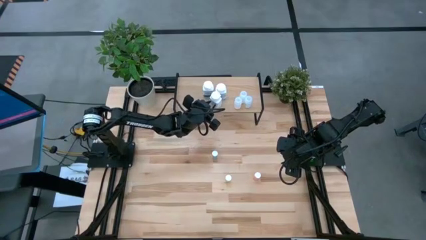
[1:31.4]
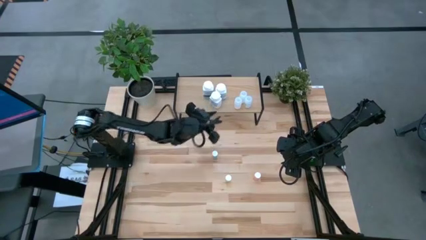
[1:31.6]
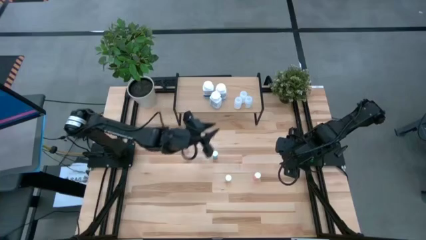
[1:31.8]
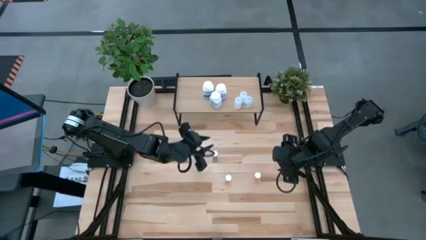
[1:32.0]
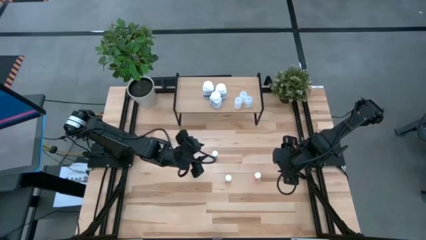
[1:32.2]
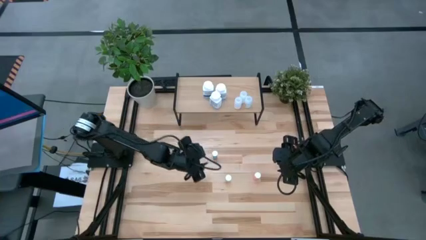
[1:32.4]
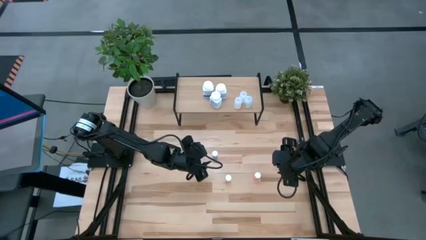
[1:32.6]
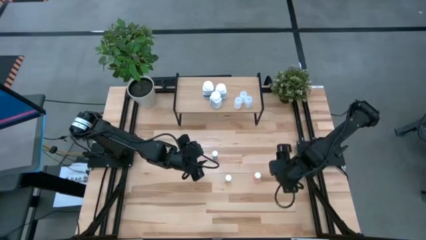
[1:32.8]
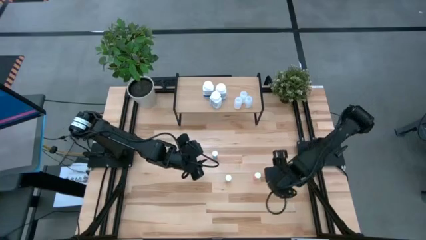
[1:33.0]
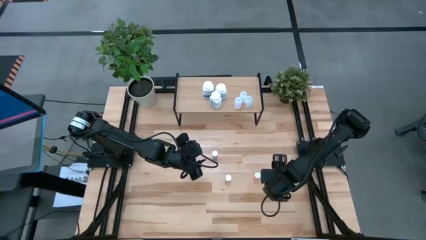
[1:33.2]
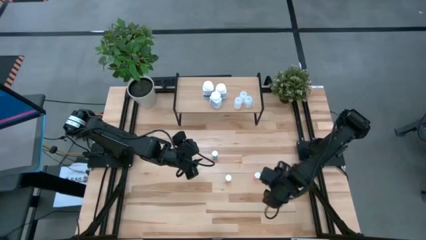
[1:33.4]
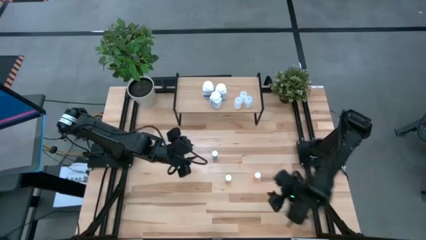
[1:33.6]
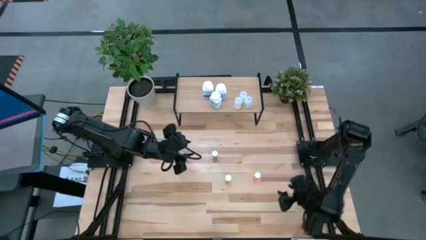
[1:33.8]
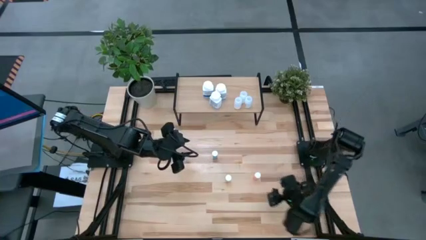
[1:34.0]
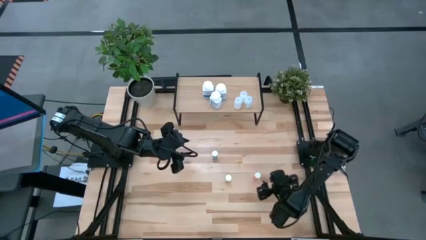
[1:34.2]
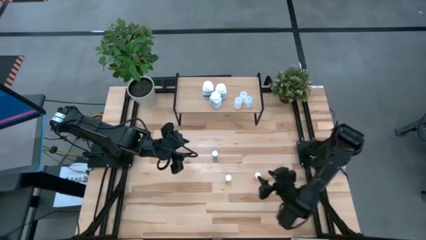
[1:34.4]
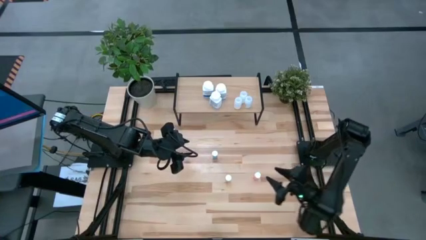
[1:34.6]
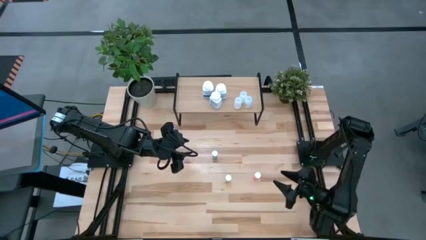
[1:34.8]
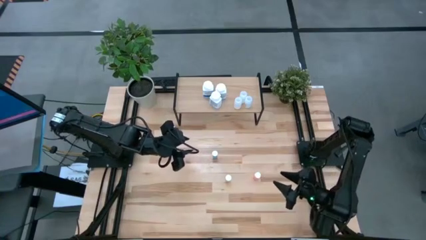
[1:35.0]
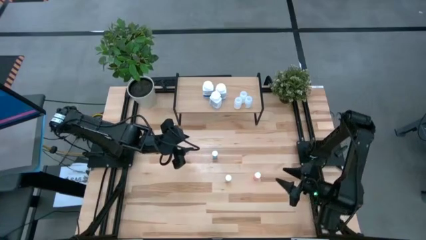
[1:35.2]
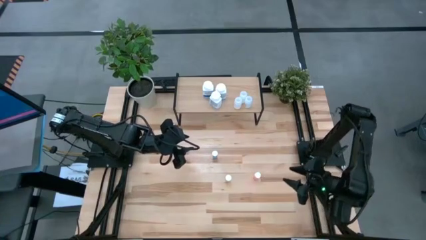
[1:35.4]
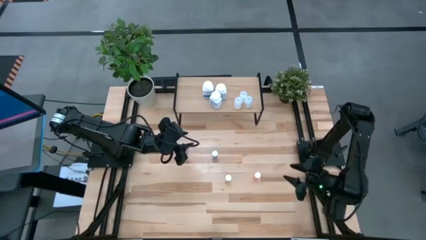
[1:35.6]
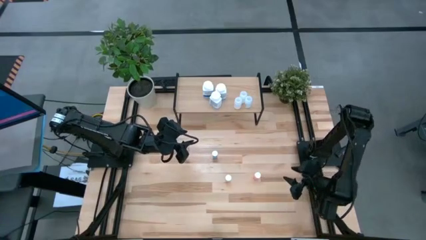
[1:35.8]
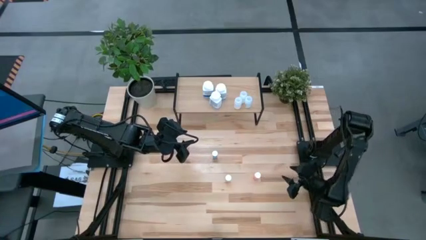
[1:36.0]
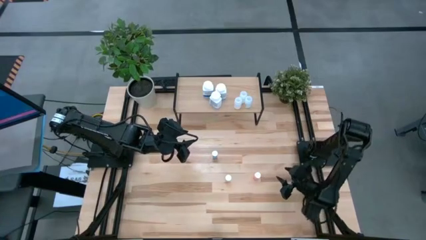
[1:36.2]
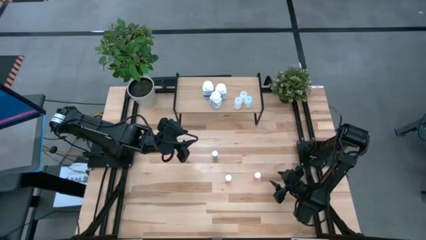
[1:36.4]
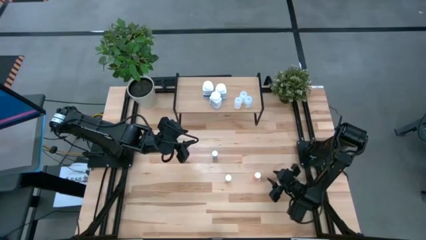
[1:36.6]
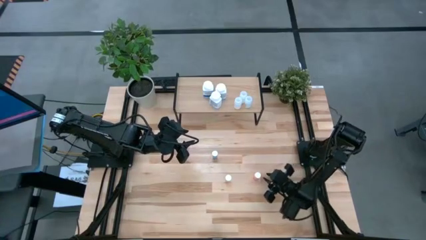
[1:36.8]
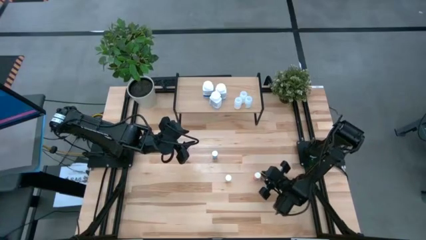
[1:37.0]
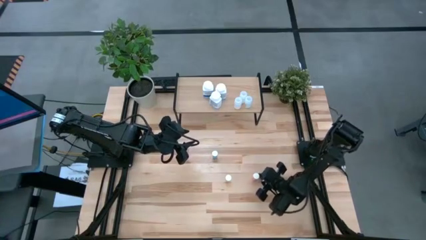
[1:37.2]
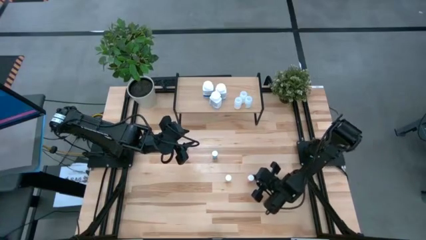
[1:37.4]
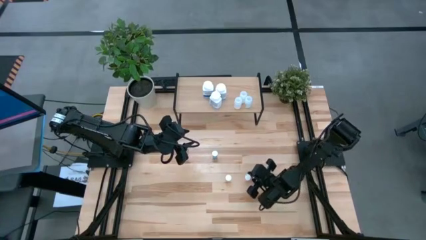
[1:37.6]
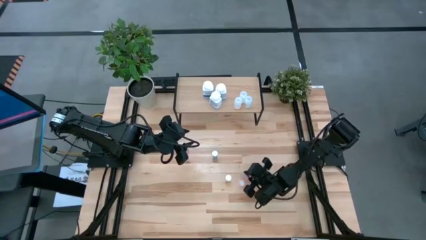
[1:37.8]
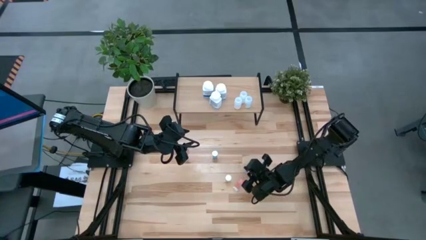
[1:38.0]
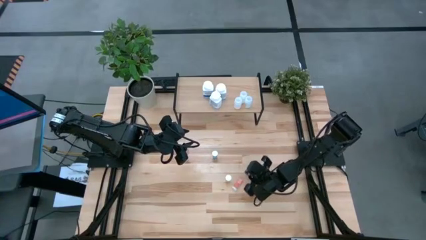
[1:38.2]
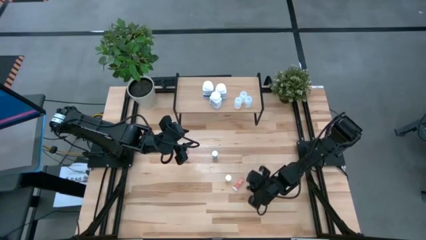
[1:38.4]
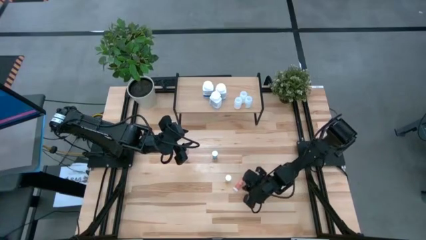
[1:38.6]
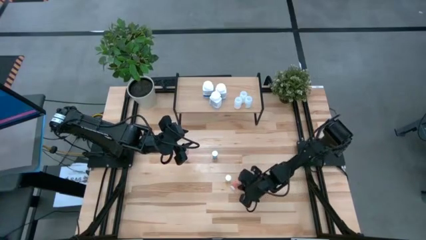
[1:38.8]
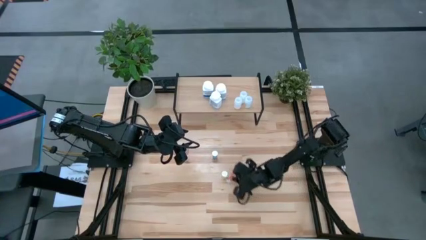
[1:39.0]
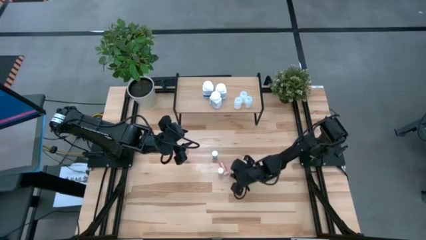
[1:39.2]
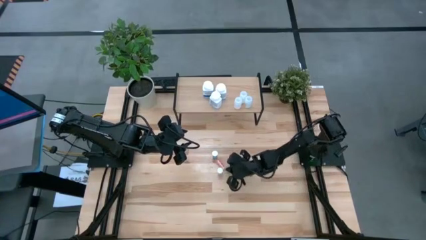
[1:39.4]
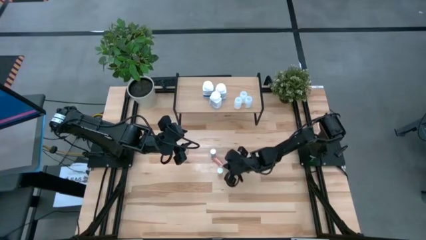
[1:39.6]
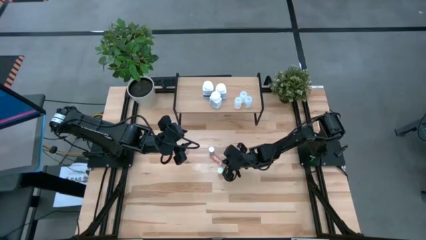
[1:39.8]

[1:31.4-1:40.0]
Task: Pick and place medicine bottles onto shelf by color
Put the pink pill bottle on the shelf

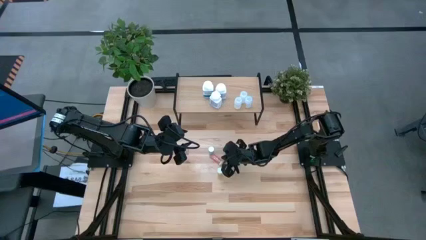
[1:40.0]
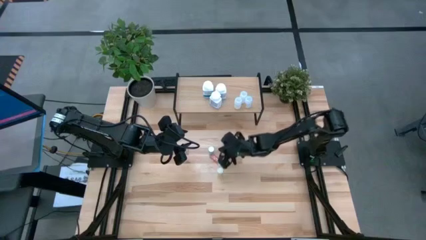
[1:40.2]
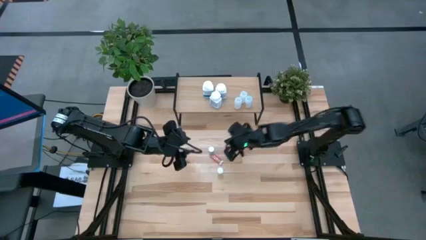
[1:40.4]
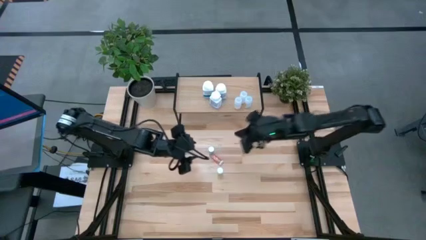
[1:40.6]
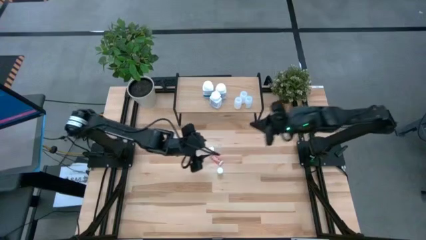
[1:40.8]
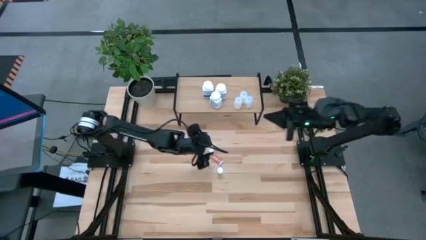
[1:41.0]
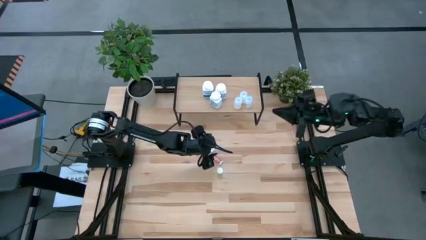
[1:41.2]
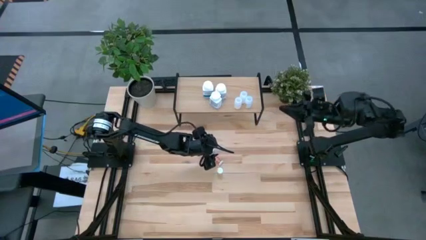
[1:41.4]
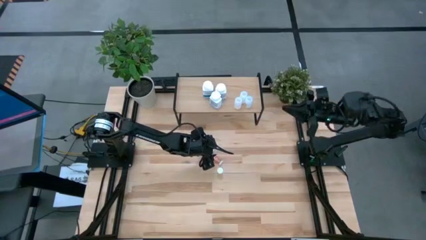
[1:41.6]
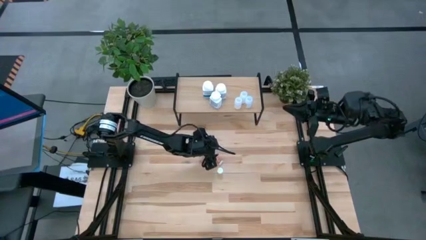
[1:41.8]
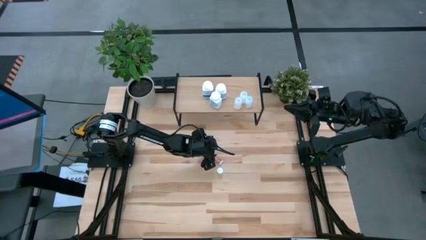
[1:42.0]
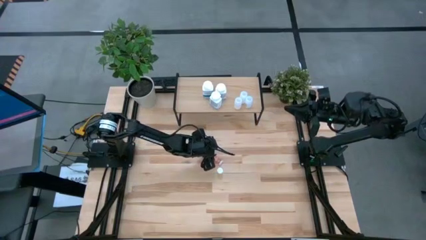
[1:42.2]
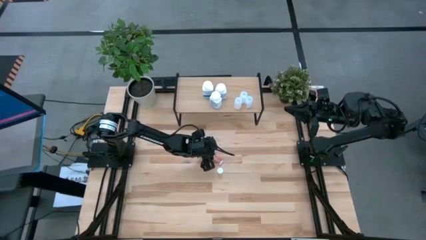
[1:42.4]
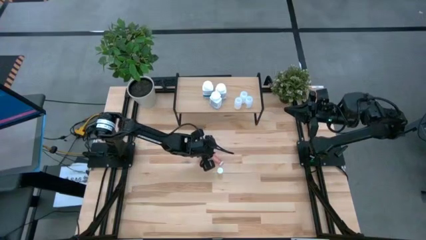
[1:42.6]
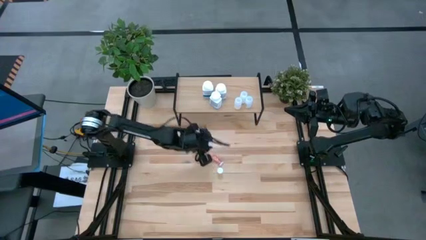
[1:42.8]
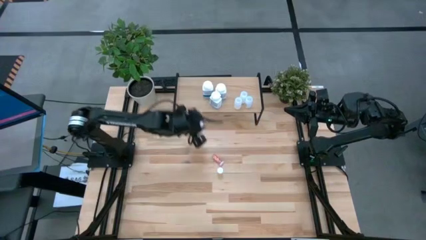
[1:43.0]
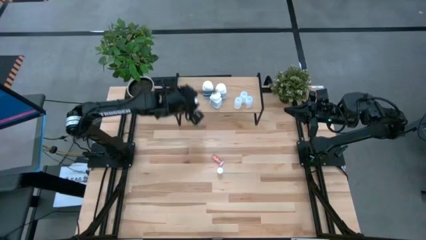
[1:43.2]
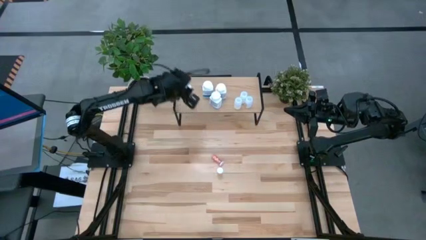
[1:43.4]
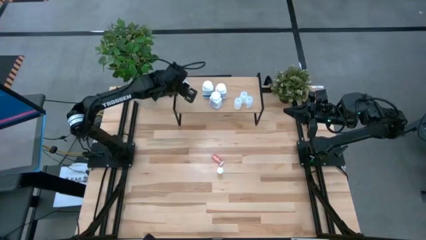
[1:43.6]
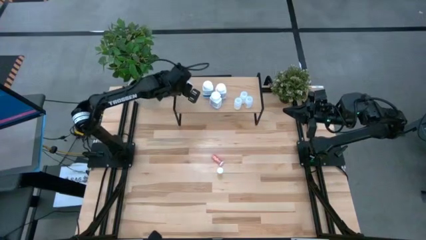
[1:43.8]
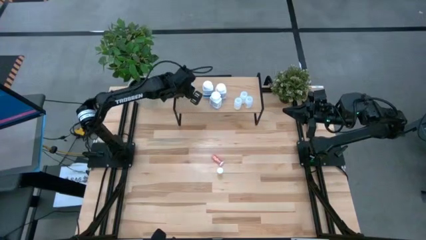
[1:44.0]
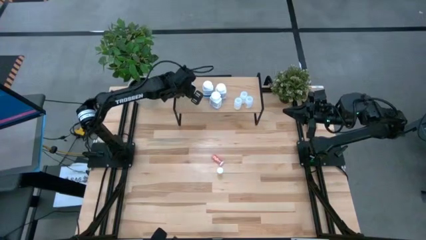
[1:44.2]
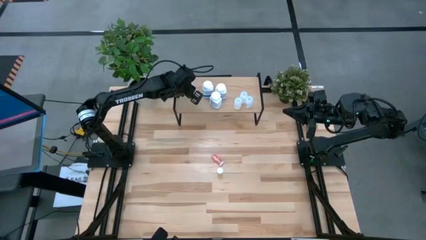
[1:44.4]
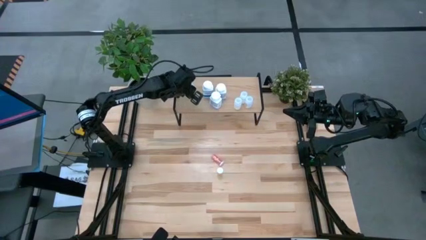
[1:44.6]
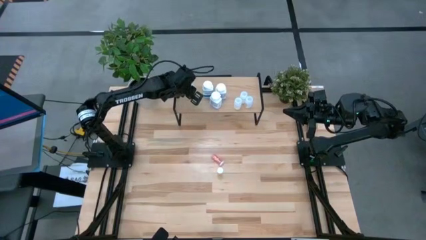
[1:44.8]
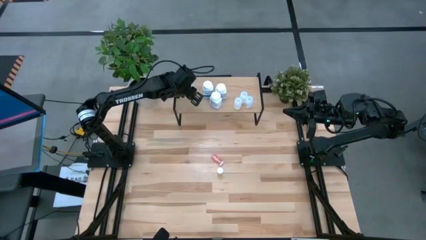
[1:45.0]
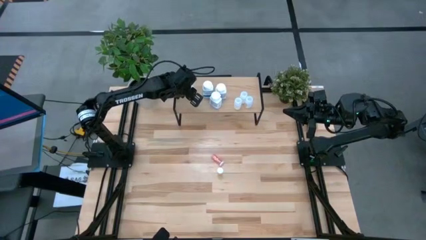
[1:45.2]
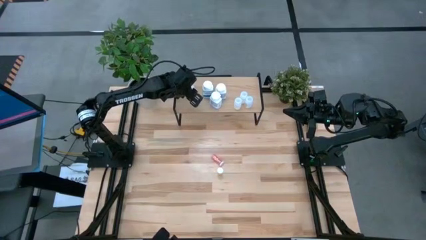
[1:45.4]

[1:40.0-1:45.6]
Put the blue pill bottle on the shelf

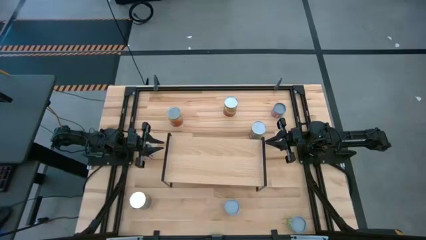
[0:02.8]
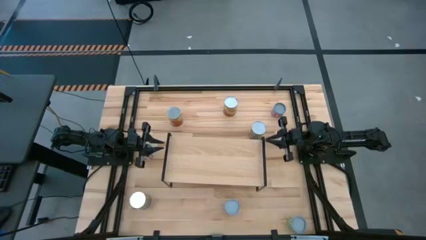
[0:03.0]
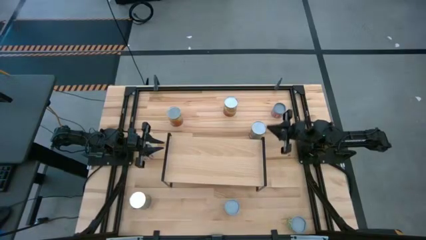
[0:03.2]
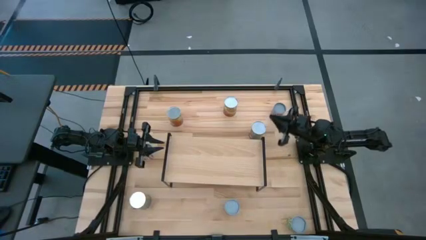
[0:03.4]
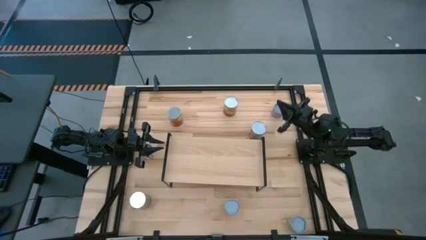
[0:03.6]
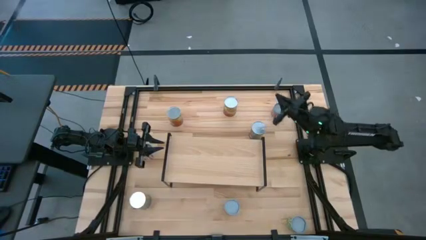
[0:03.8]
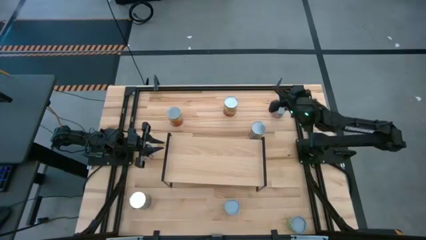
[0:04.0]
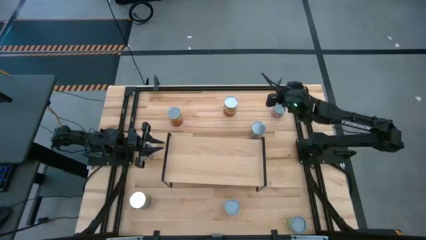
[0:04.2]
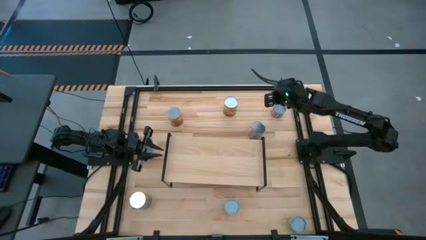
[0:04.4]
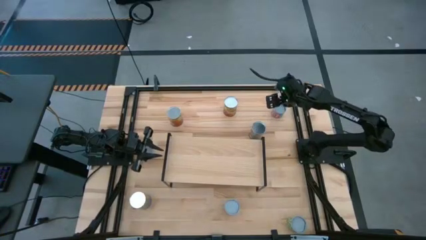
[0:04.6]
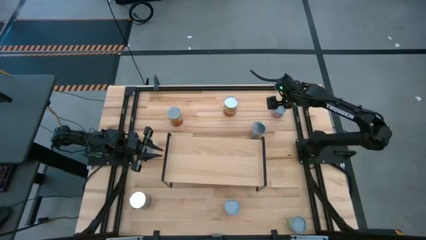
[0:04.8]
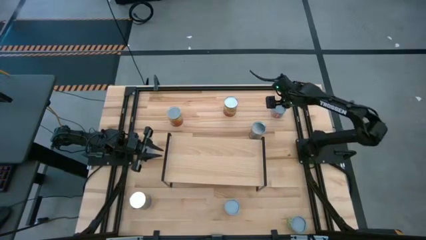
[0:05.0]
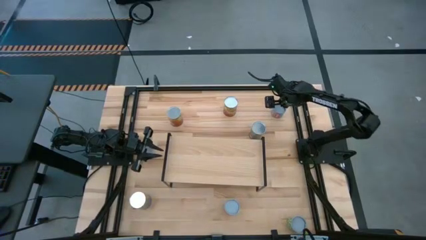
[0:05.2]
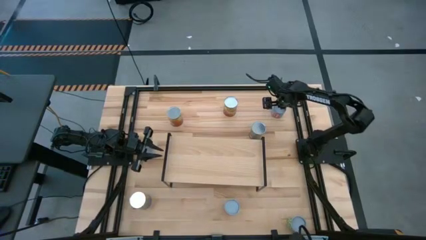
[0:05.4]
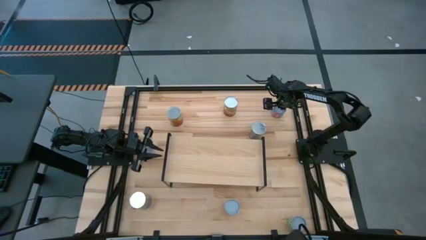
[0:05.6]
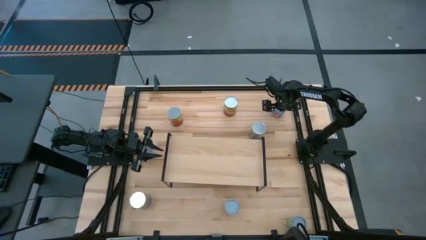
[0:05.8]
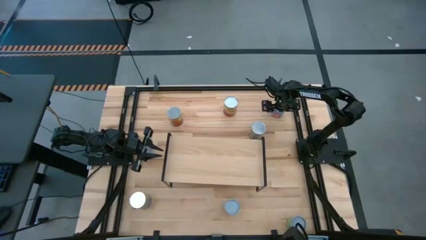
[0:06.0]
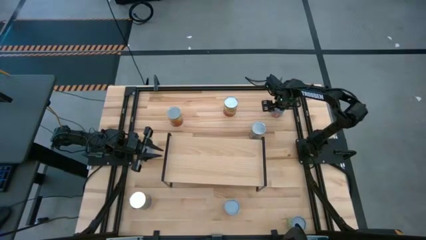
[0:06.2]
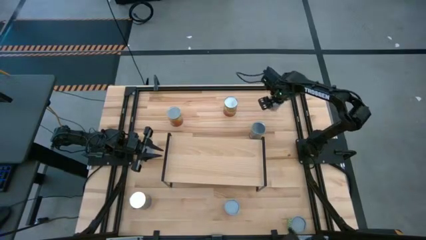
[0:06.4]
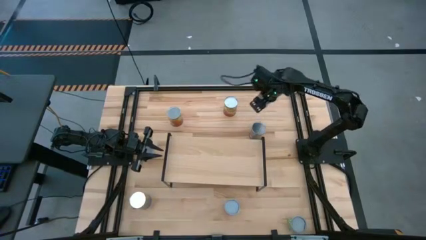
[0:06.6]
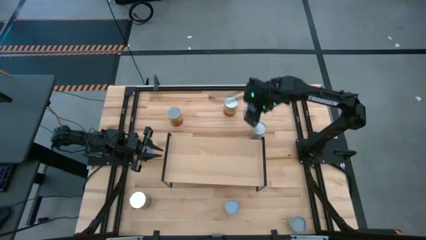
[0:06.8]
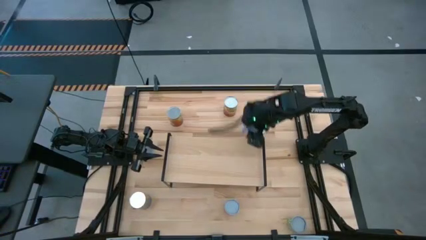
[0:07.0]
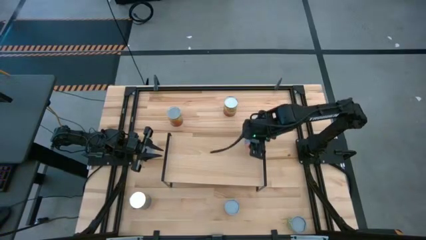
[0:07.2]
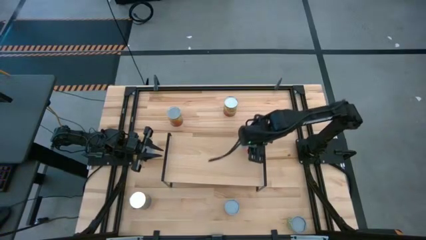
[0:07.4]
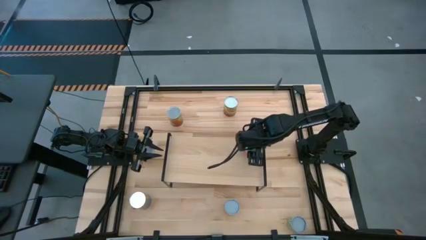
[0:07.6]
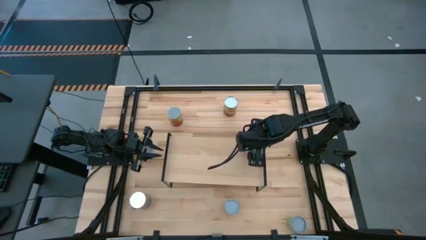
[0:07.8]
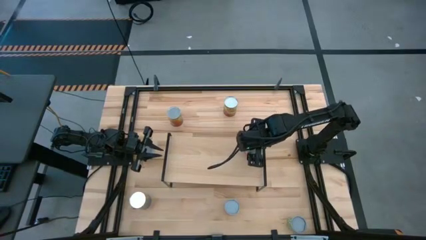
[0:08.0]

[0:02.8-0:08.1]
Task: Pick and place cans onto a shelf
Put the small canned corn on the shelf
